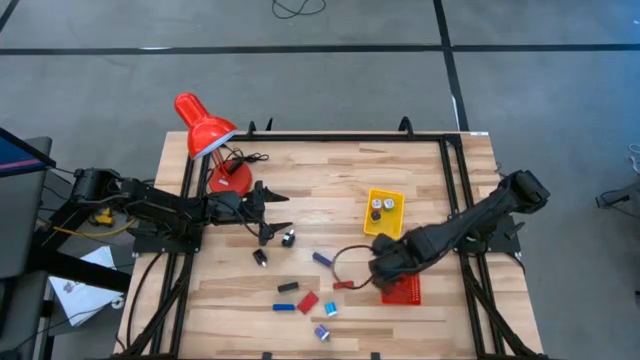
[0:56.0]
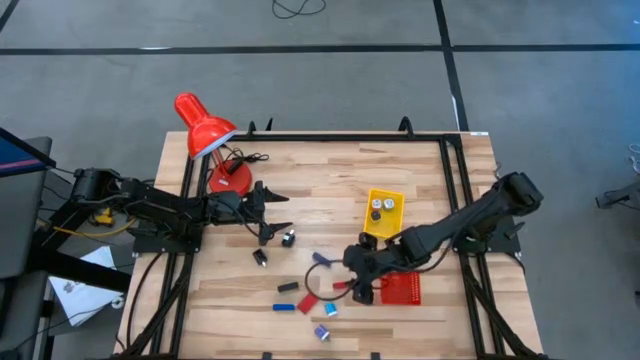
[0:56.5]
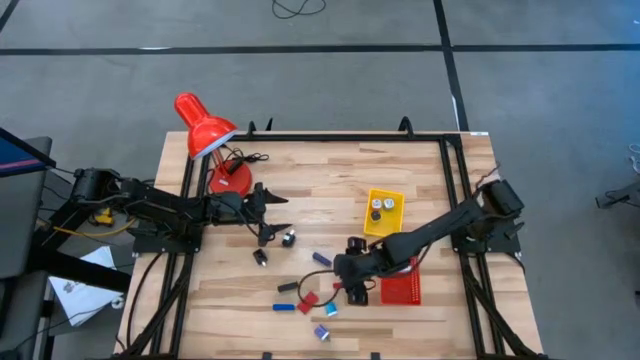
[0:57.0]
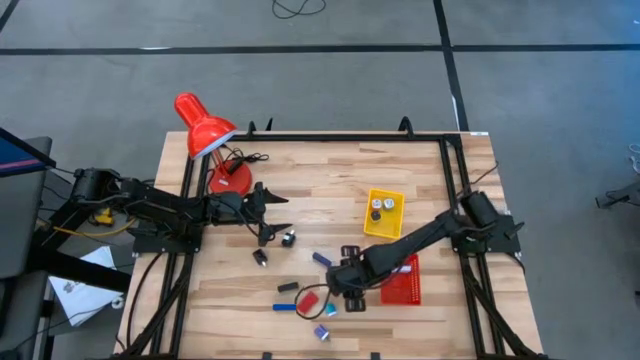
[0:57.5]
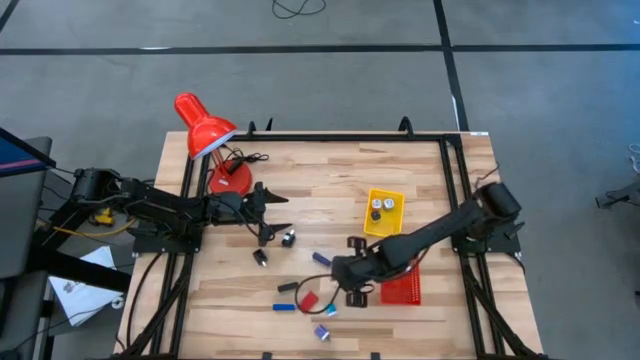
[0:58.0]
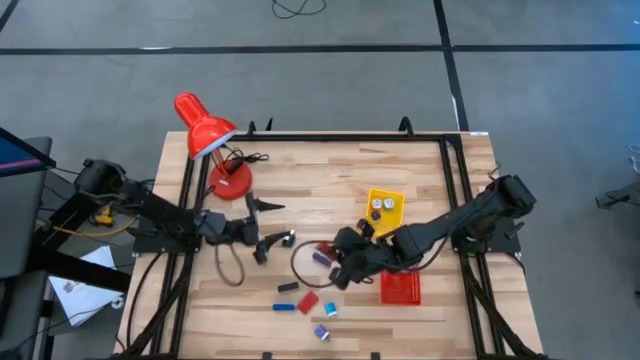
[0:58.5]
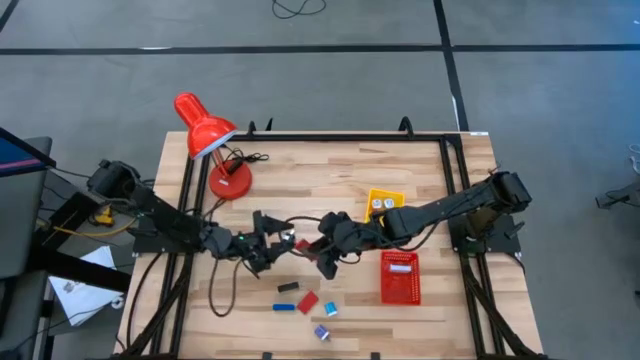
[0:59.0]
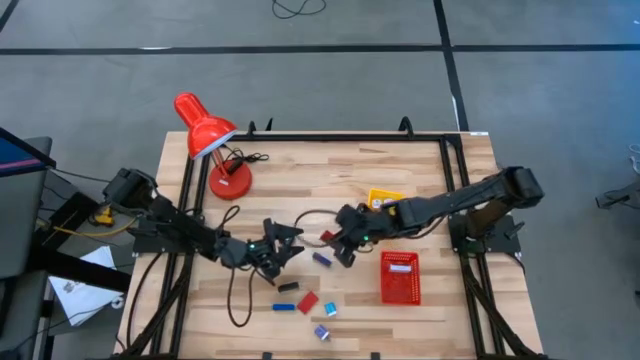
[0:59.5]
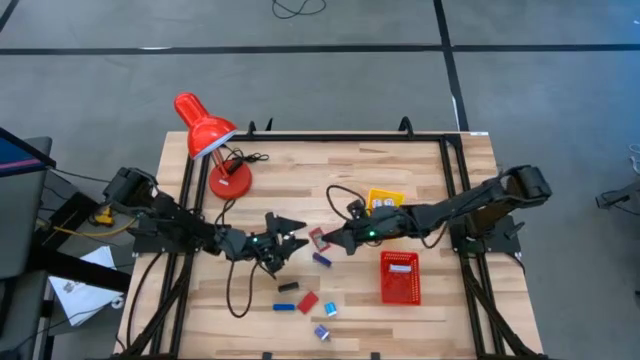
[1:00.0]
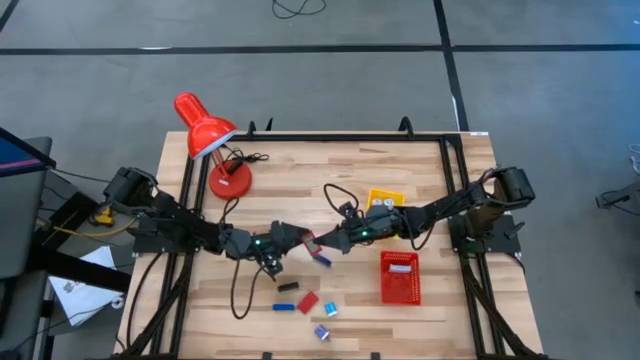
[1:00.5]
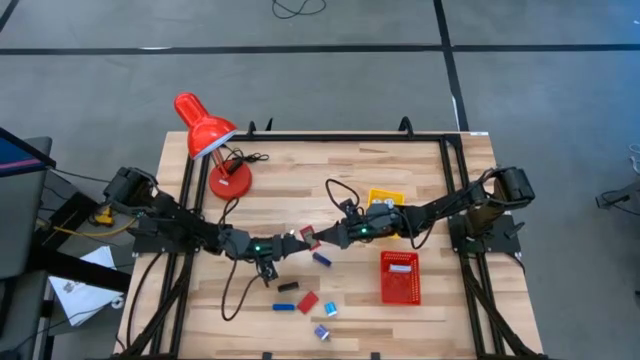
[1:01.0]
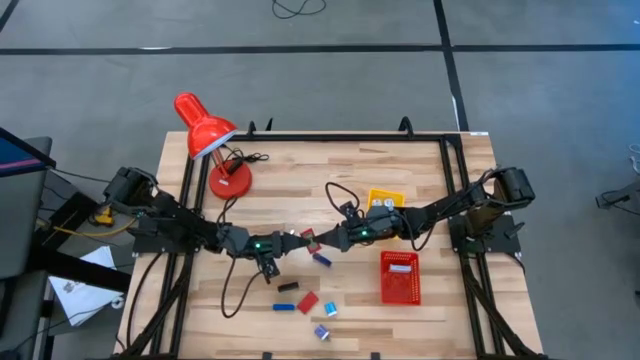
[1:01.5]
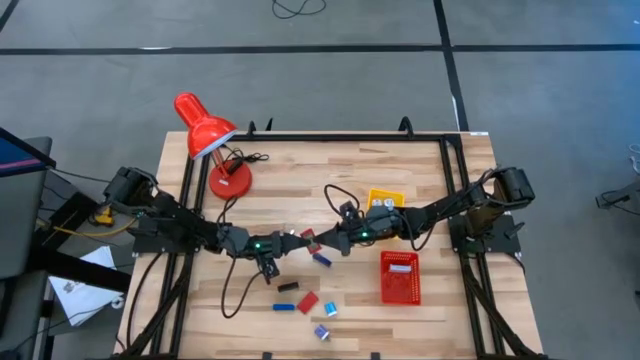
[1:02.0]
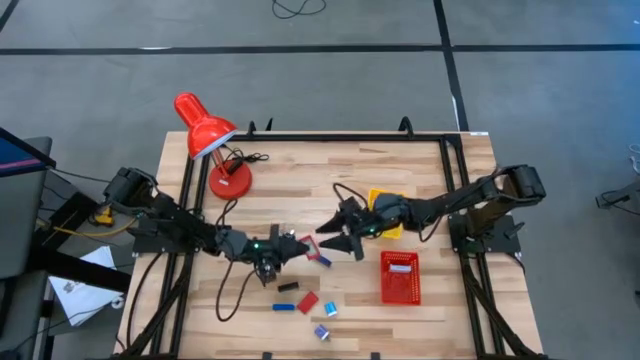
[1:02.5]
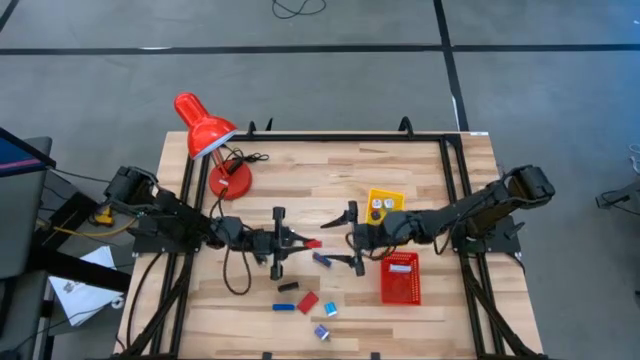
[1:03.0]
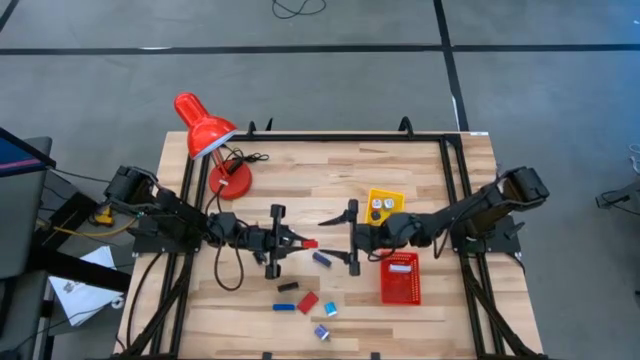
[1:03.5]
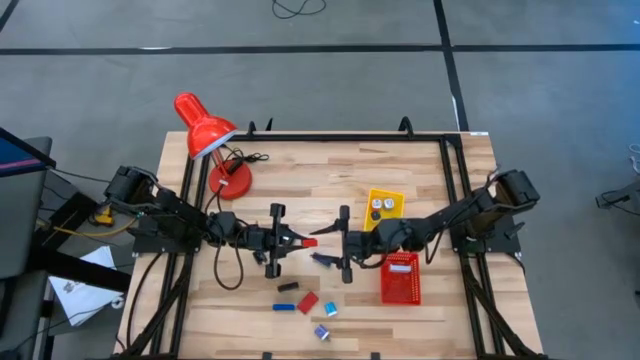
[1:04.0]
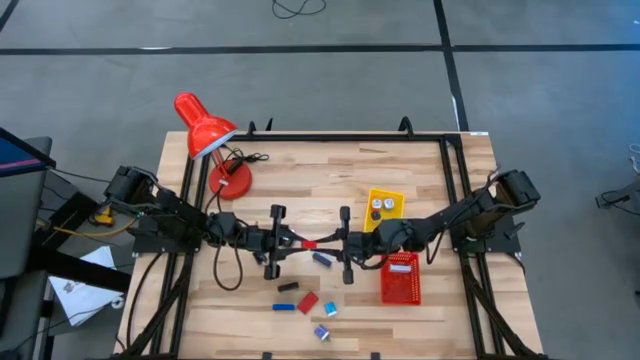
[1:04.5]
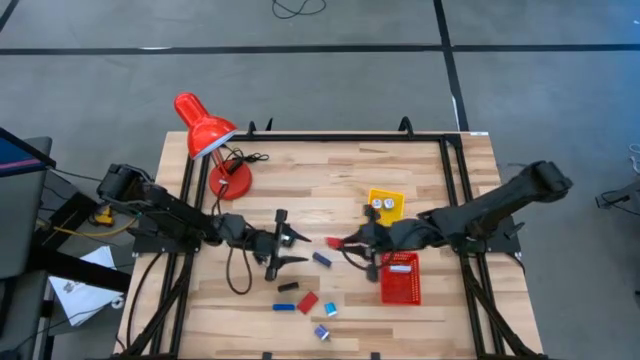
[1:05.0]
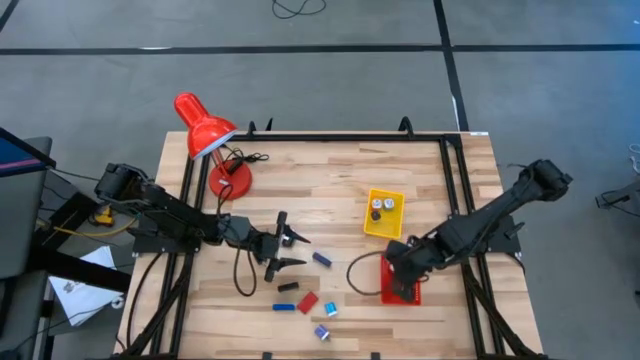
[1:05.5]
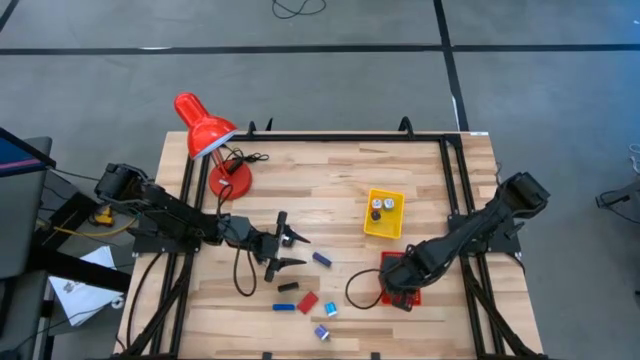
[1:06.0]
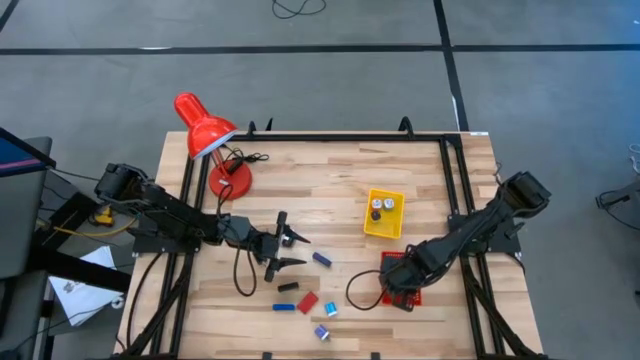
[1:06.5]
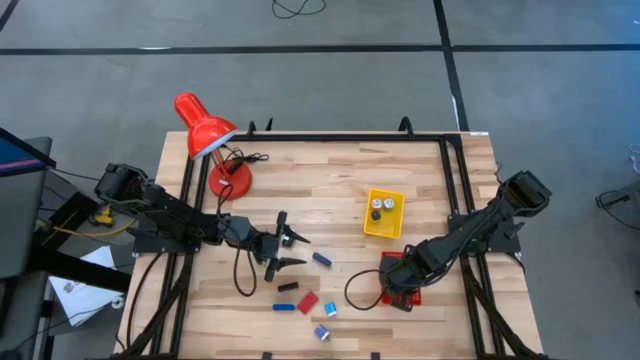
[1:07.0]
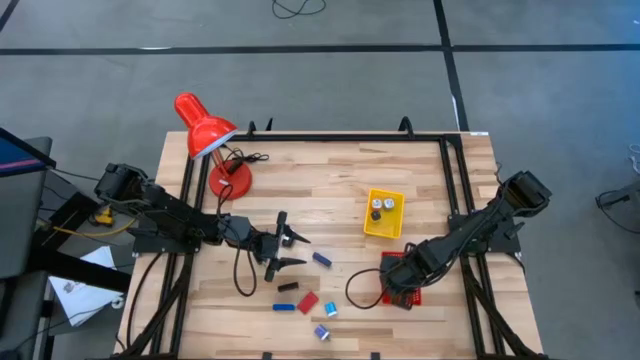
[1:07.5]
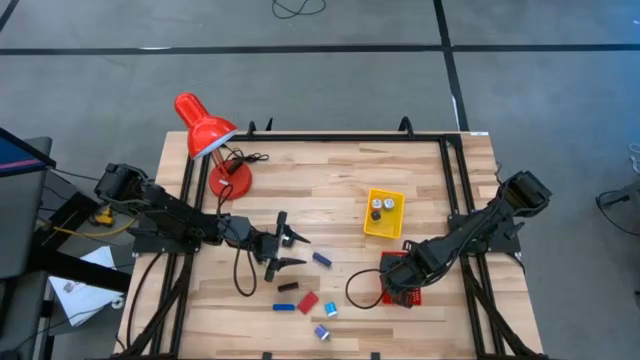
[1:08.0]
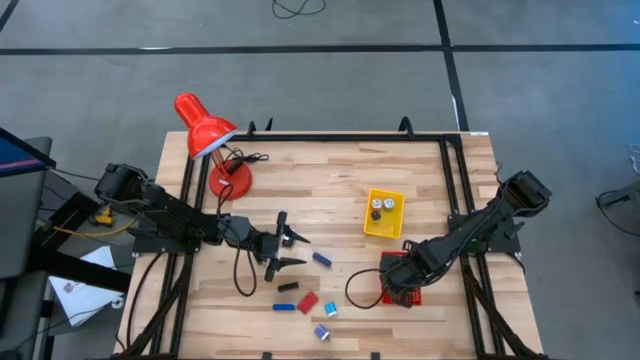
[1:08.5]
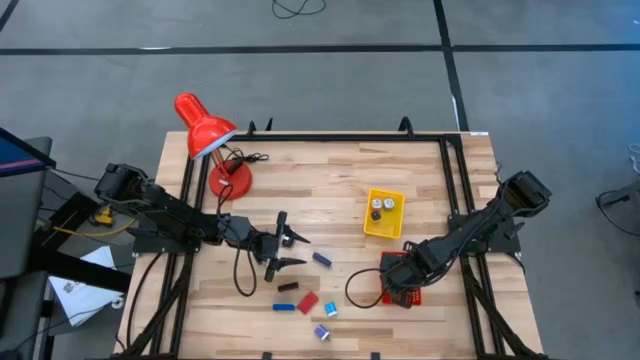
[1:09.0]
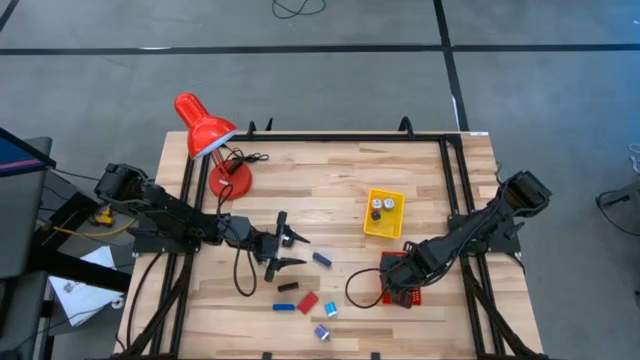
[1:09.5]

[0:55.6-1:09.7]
Task: Pick & Place Office items
Put the top red digital timer into the red bin

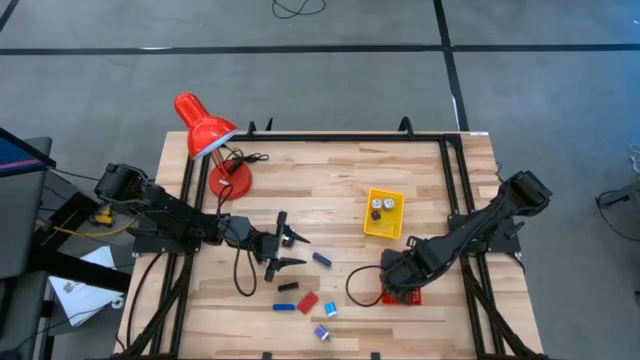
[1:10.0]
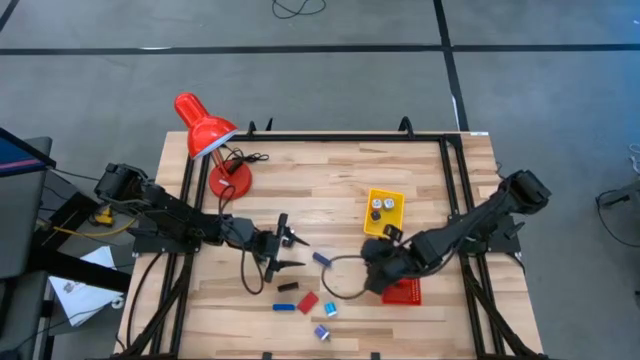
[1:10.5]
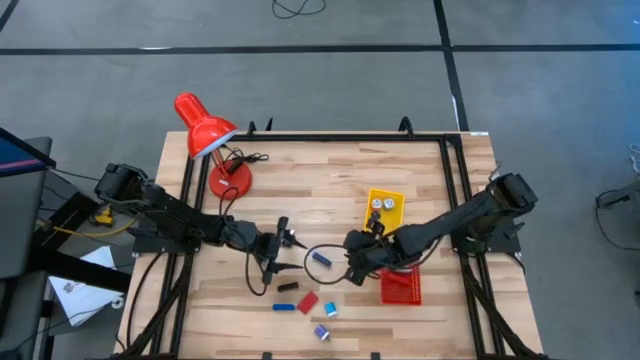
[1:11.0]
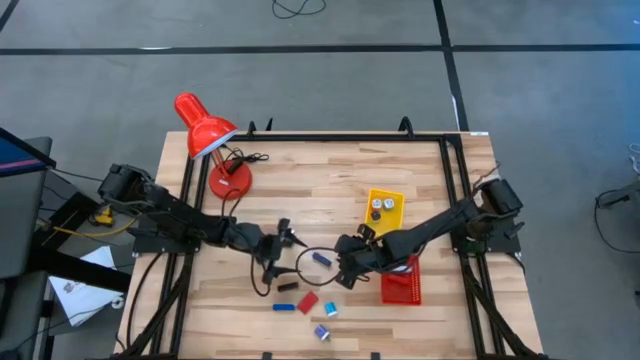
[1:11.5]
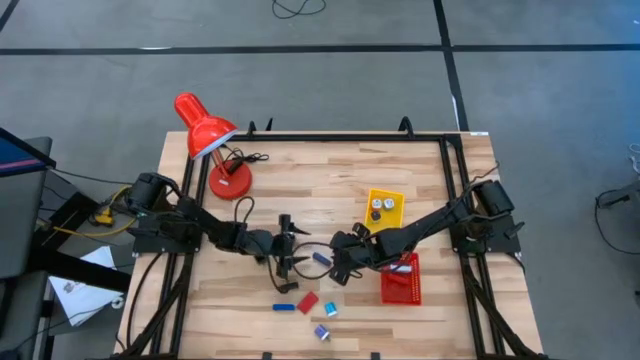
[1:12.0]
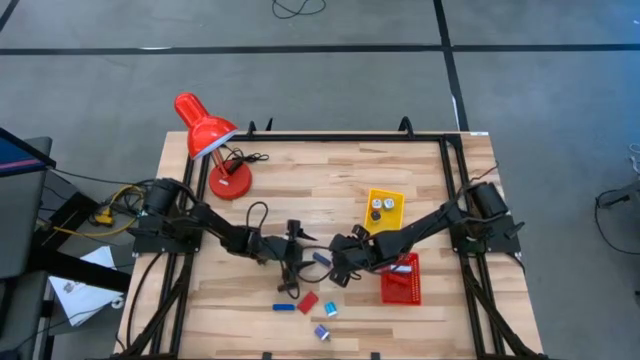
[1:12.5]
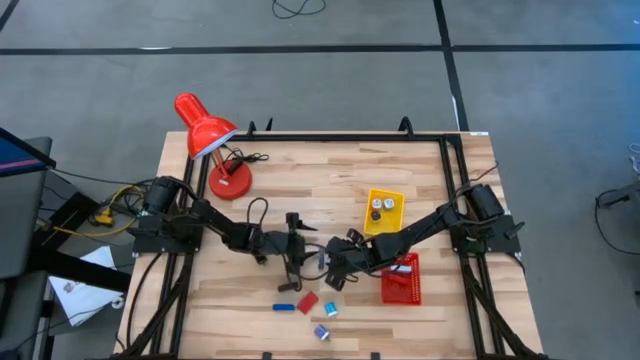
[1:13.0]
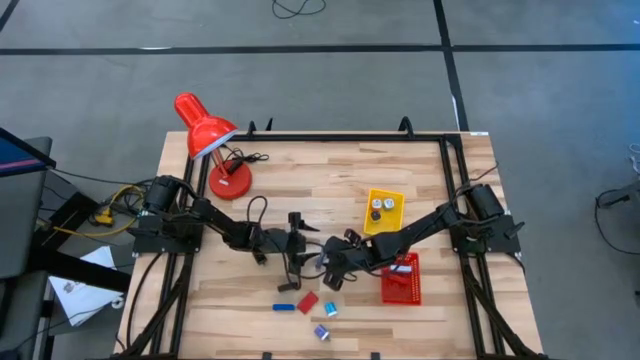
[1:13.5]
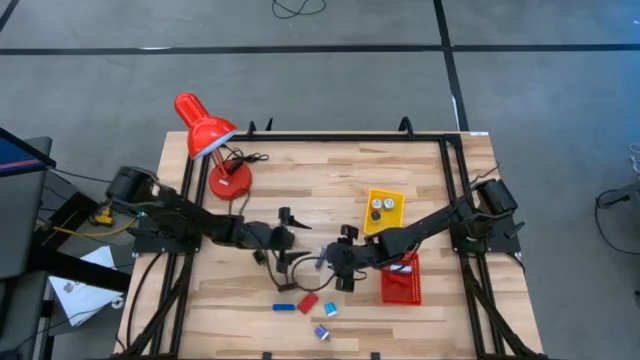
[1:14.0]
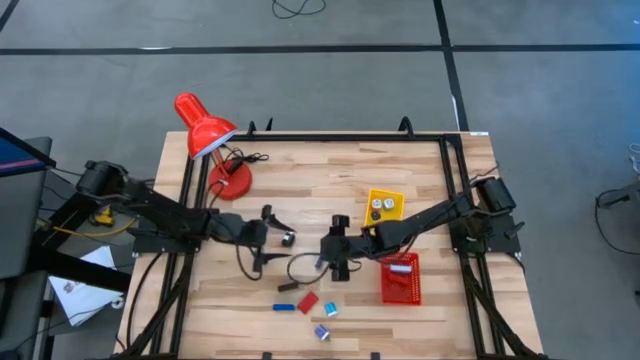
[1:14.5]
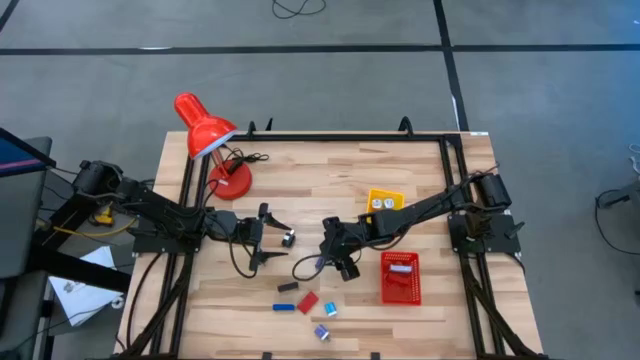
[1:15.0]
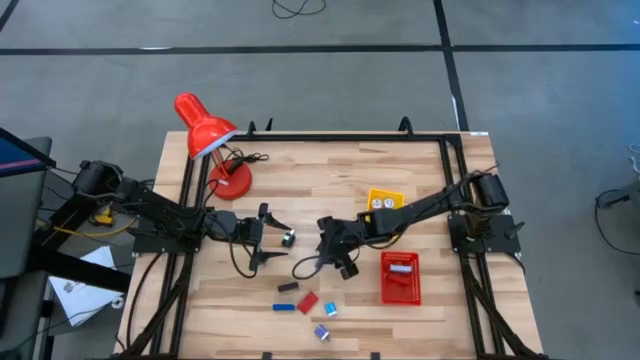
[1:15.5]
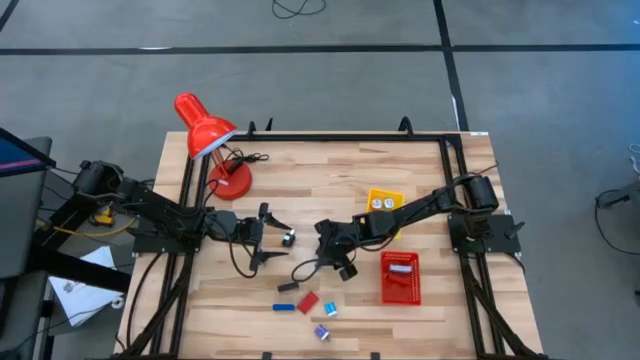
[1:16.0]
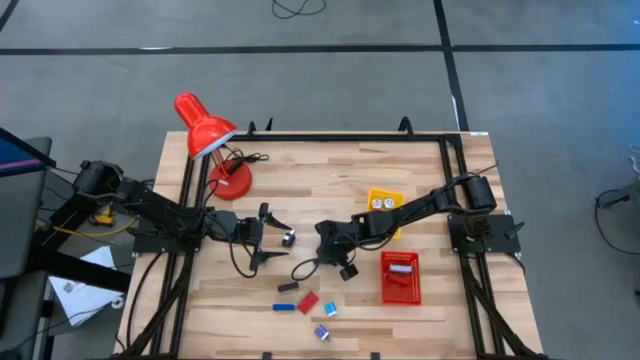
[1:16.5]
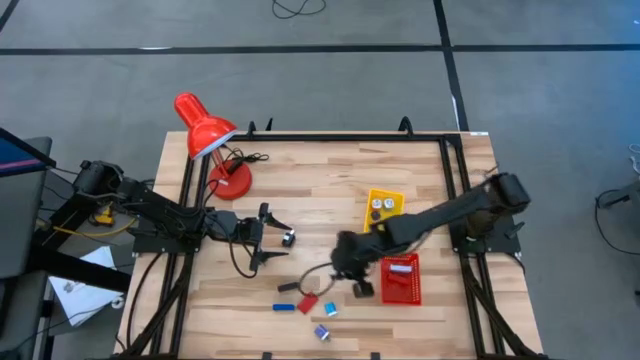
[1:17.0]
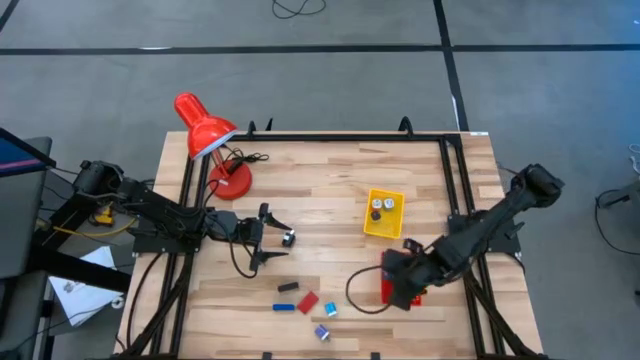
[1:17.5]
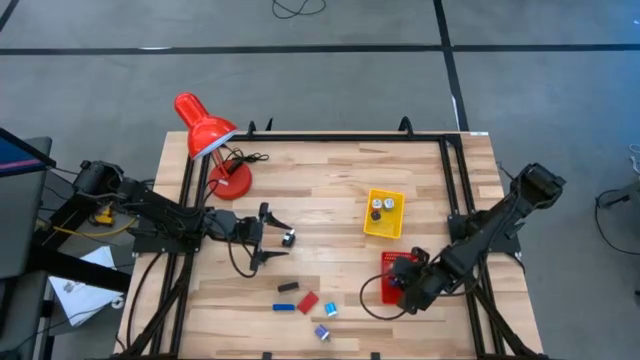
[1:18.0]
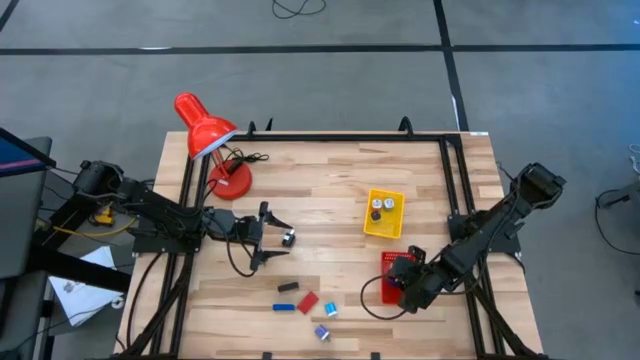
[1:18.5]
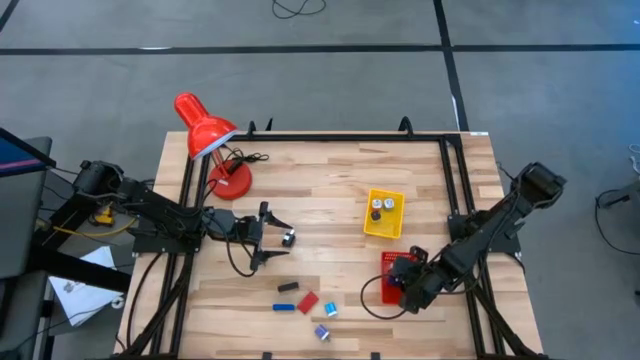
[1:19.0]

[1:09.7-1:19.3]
Put the top blue digital timer into the red bin
